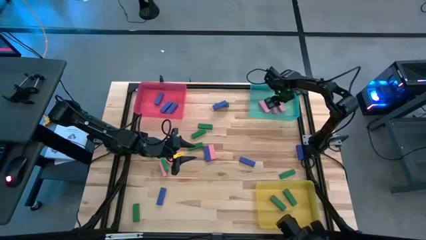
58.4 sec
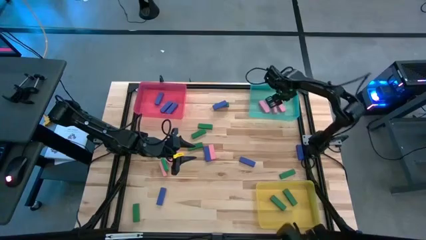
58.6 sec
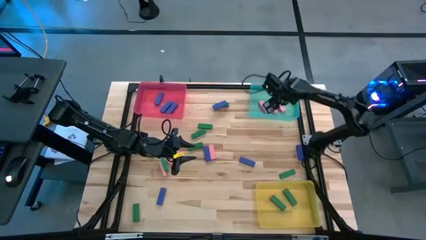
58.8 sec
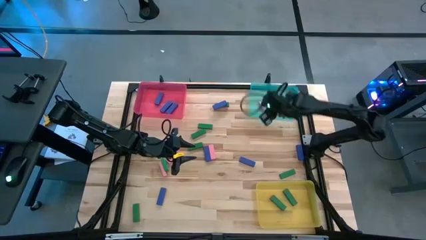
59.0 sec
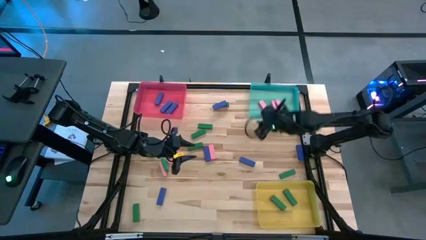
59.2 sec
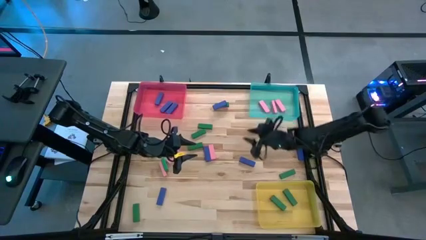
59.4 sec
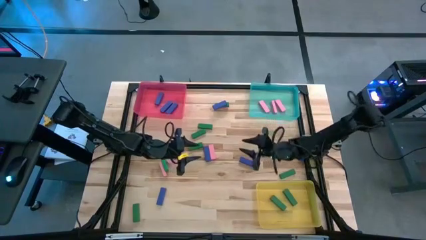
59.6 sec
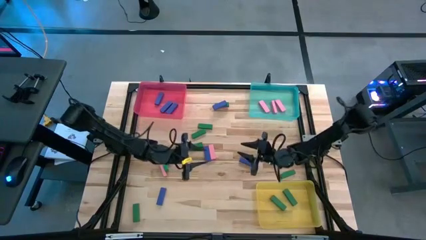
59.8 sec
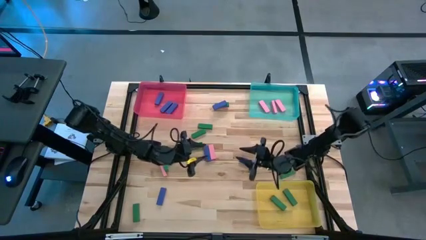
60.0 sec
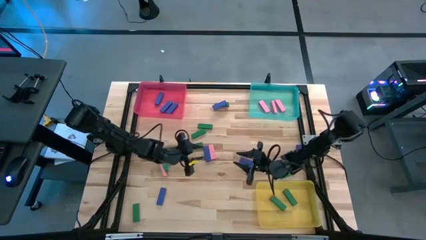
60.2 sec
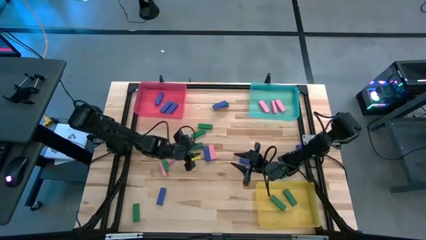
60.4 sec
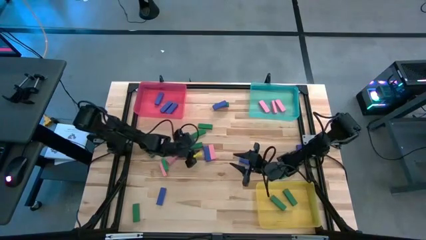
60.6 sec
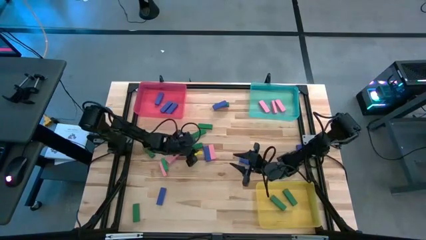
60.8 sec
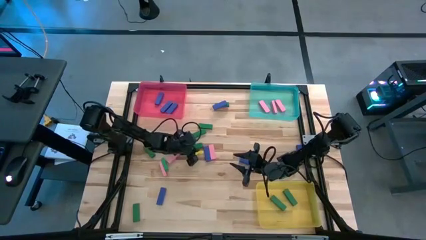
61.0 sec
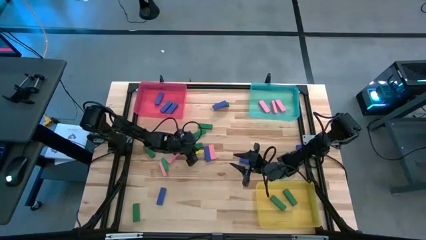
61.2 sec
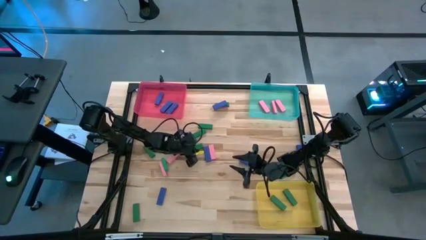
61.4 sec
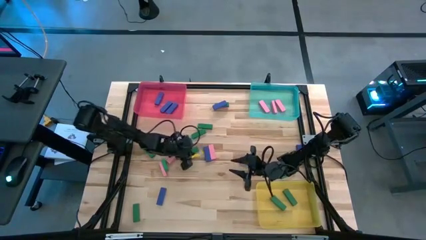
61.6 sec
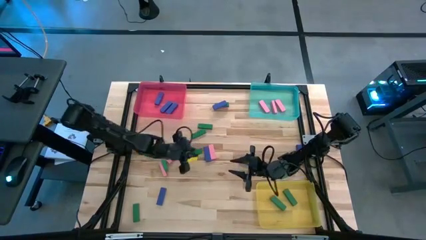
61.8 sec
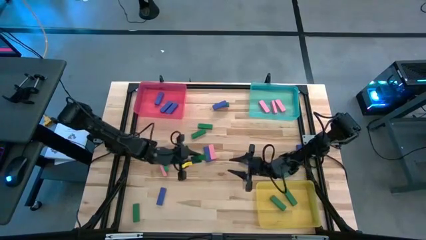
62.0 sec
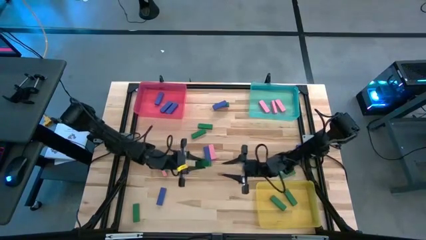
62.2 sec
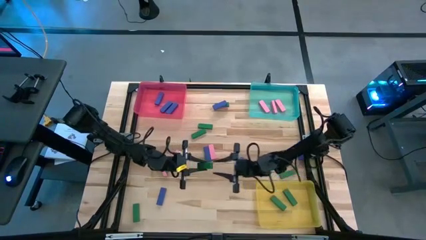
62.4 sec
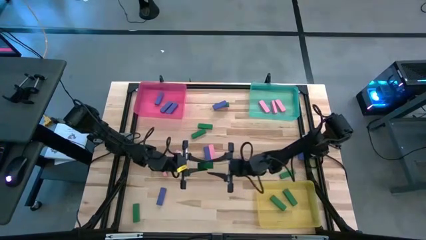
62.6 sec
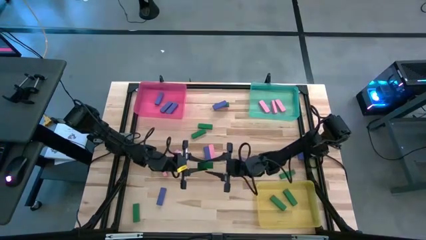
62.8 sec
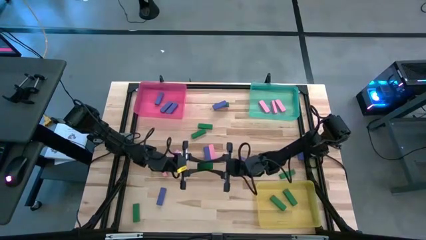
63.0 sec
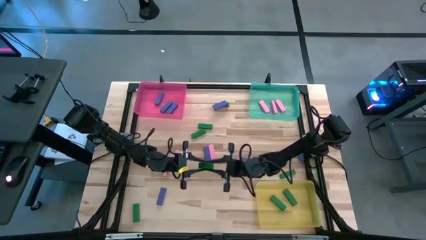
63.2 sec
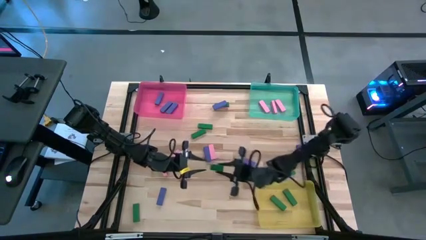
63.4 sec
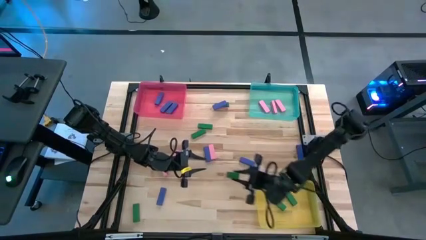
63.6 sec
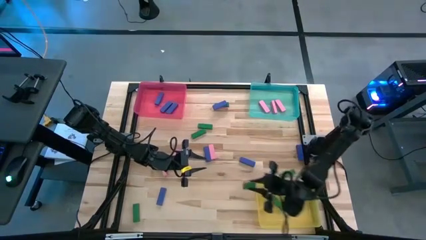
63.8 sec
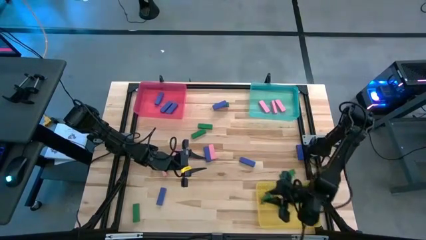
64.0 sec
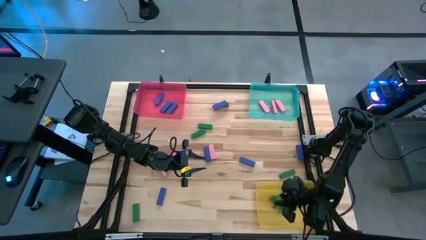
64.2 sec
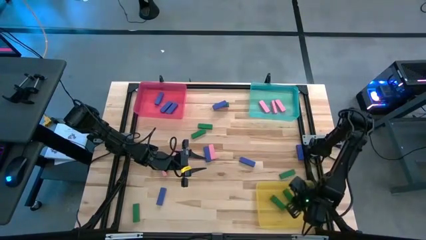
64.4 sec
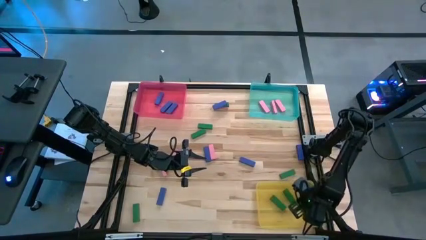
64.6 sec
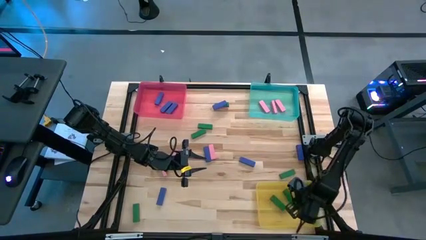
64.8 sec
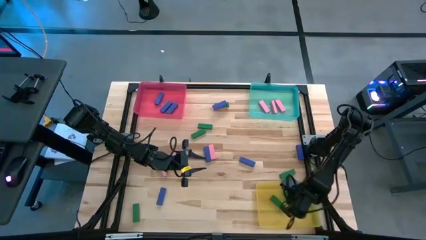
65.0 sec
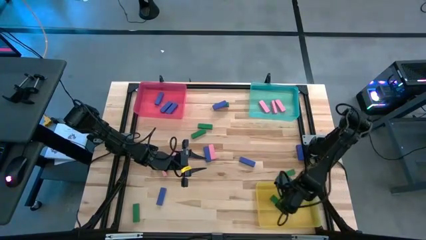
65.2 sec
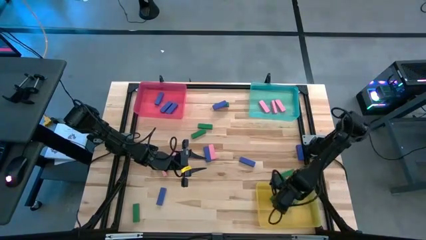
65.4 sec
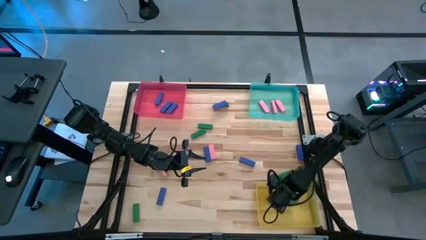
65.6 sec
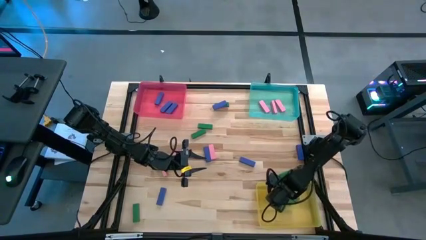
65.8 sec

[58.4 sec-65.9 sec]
Task: Sort blocks
Put the green block into the yellow bin

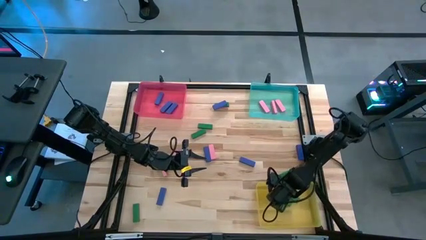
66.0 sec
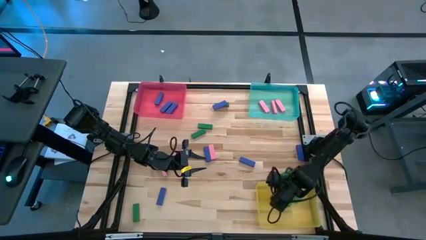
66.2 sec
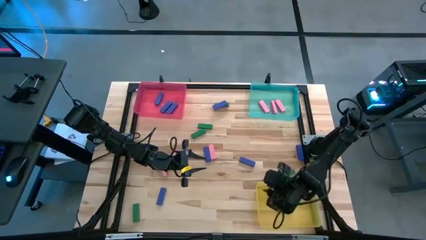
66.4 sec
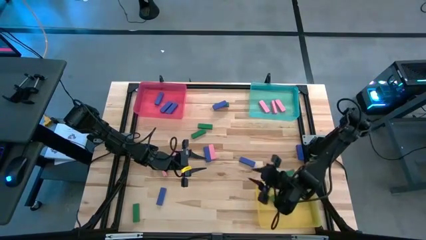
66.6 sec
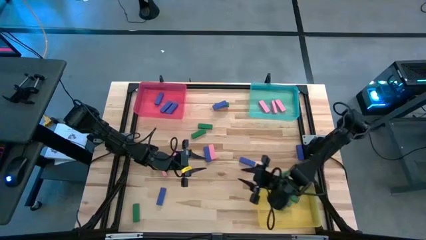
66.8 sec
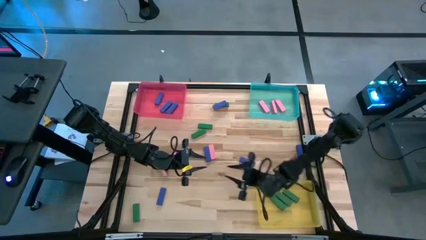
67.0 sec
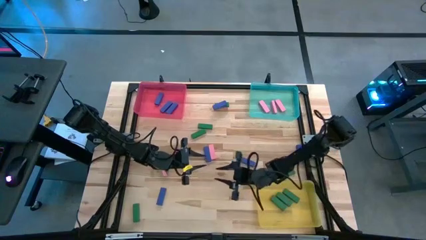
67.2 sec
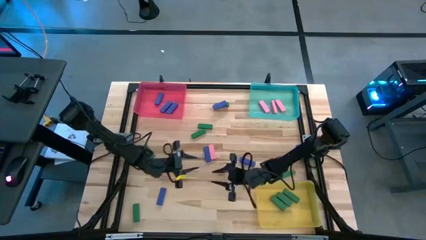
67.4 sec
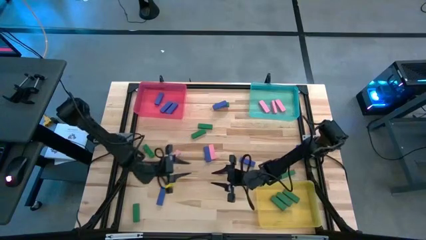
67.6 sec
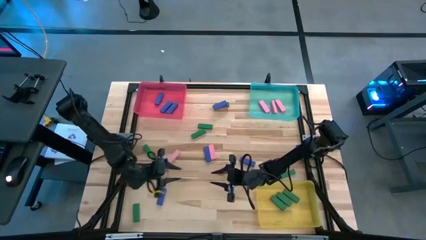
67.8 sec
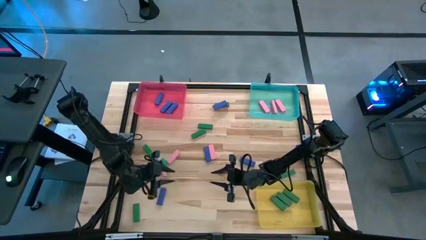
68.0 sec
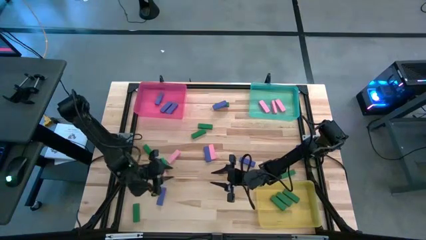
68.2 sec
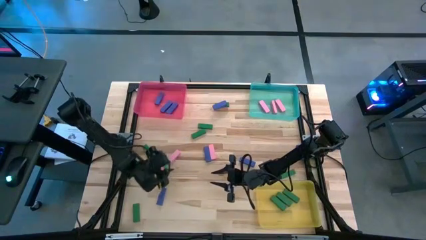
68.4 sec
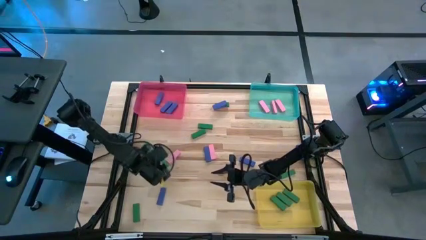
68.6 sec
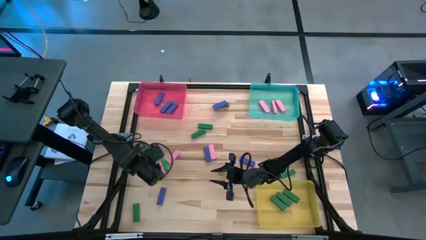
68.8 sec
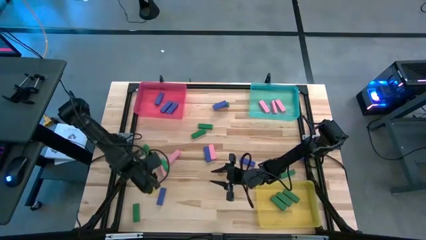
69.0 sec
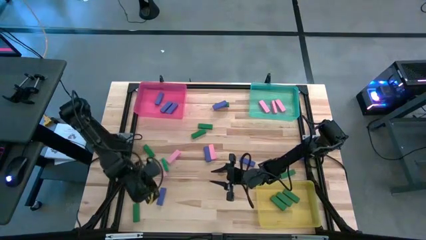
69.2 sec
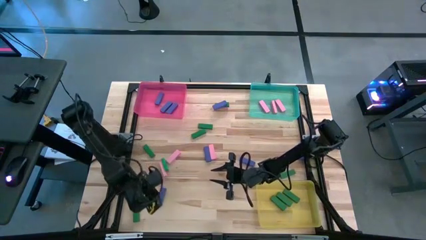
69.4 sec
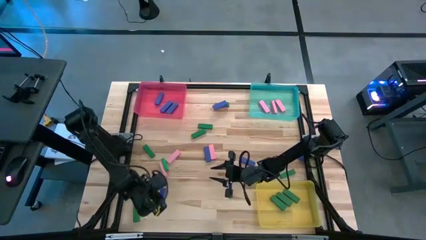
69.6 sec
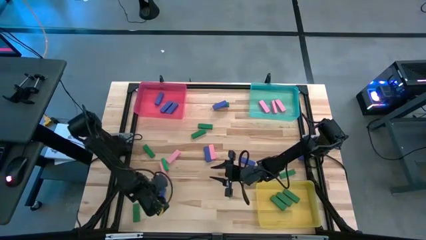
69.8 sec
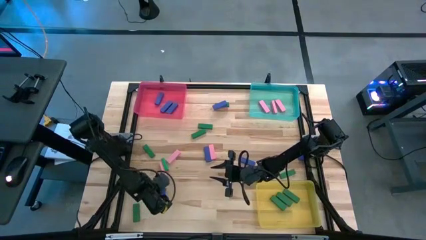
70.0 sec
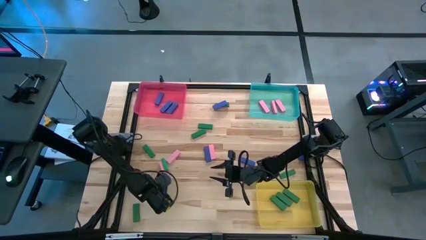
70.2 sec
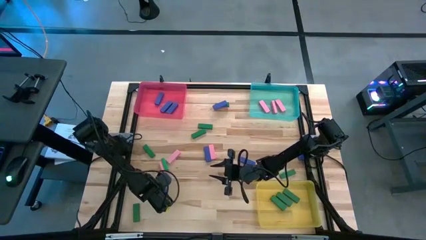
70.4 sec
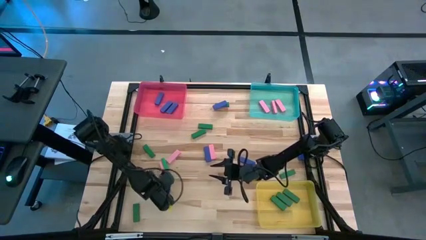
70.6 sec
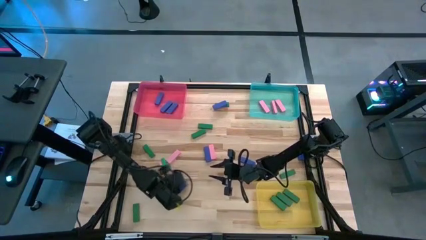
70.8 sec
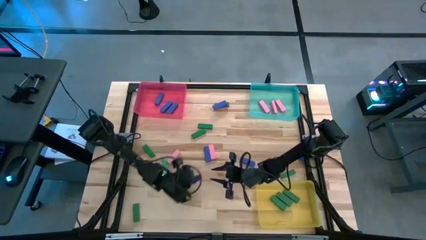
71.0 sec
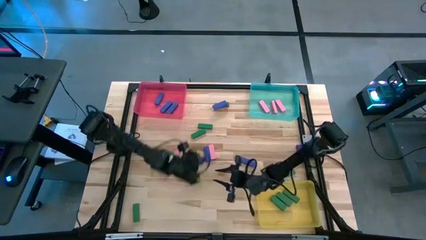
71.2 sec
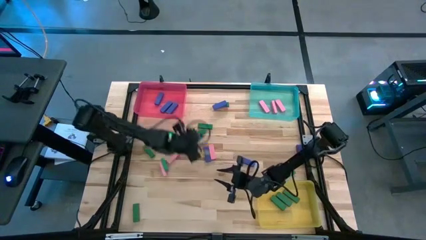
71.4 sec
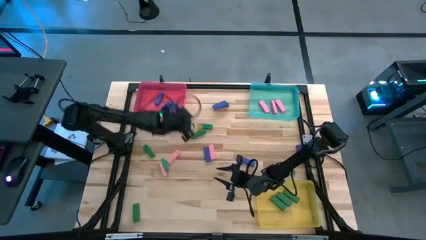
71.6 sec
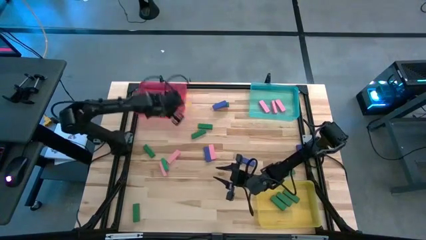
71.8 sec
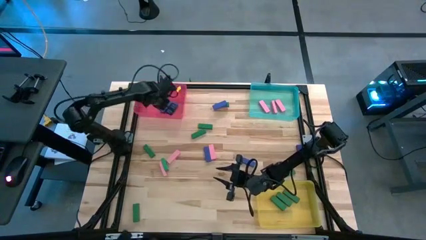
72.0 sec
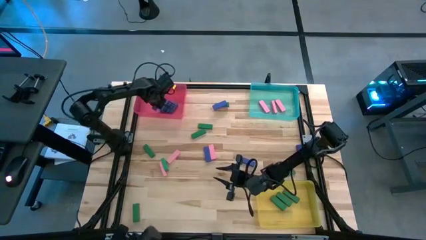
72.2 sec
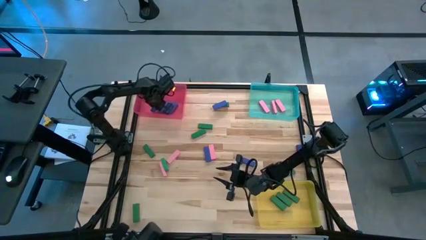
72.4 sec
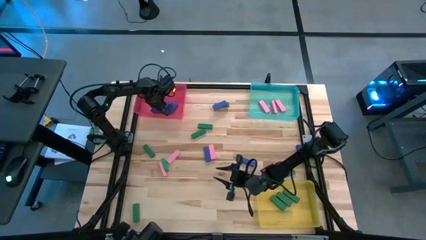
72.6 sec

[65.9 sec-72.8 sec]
Put the blue block into the red bin

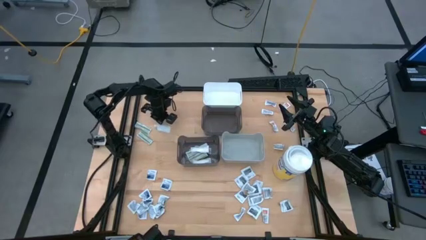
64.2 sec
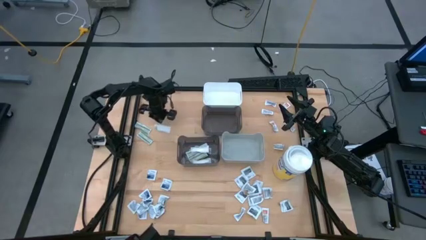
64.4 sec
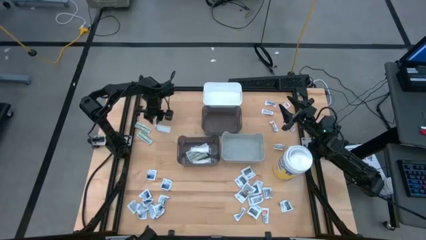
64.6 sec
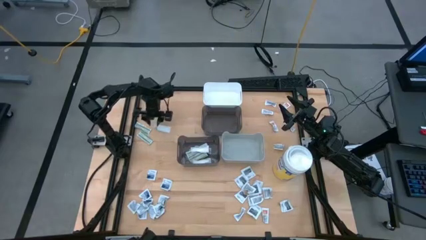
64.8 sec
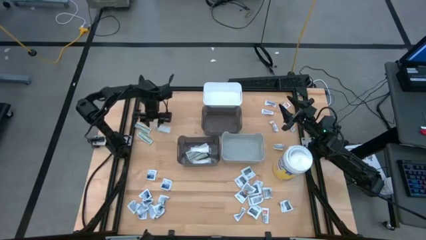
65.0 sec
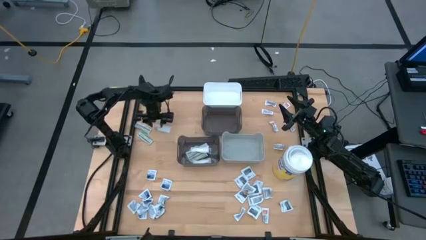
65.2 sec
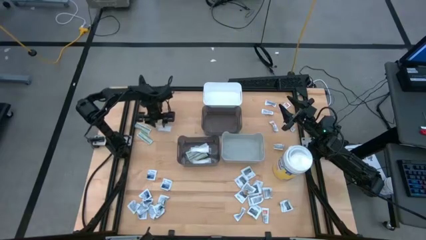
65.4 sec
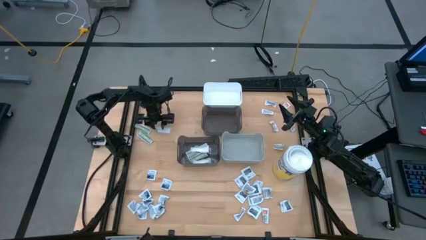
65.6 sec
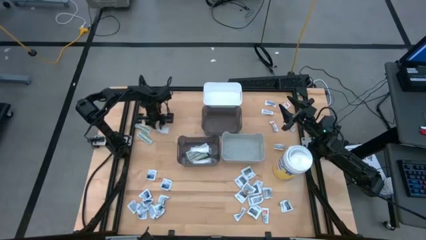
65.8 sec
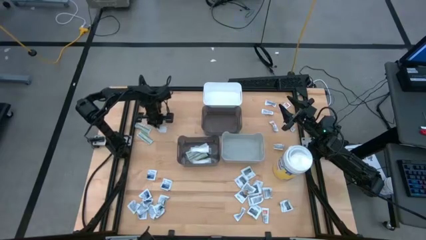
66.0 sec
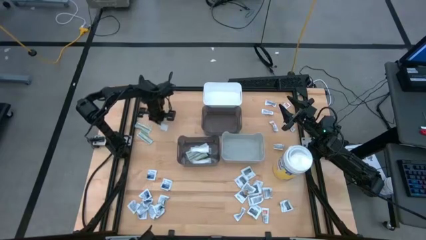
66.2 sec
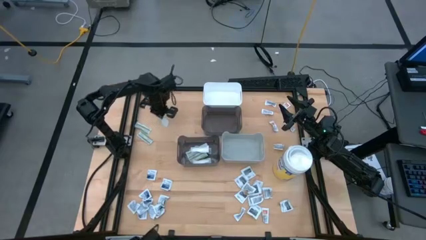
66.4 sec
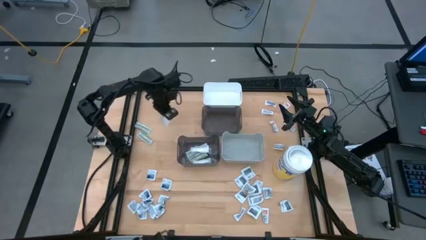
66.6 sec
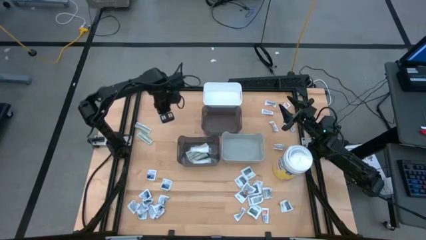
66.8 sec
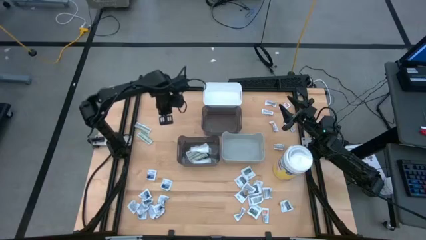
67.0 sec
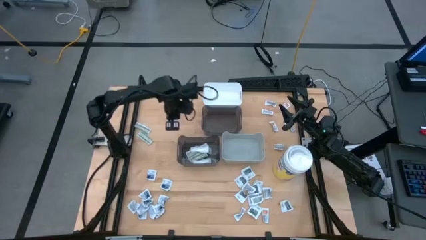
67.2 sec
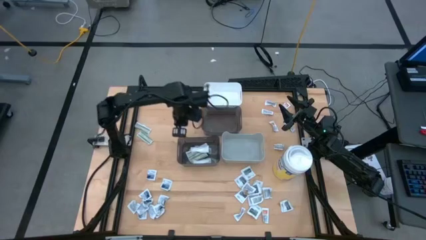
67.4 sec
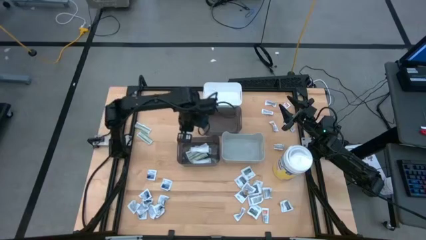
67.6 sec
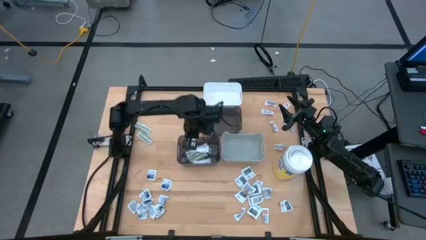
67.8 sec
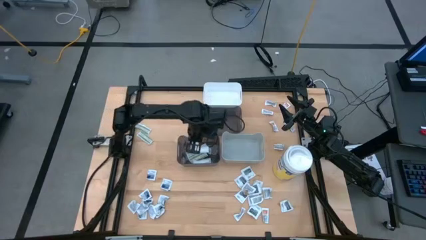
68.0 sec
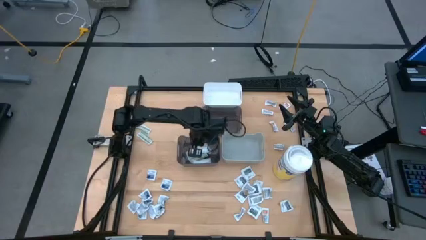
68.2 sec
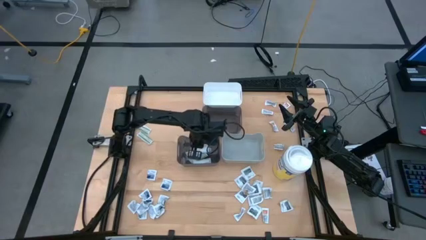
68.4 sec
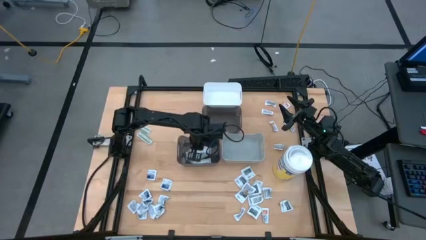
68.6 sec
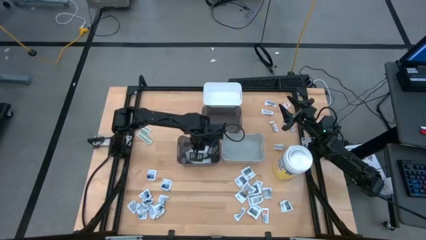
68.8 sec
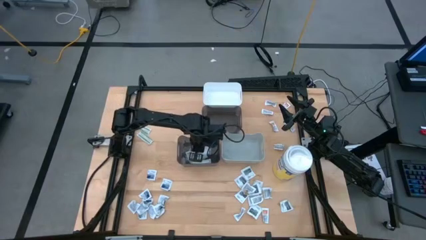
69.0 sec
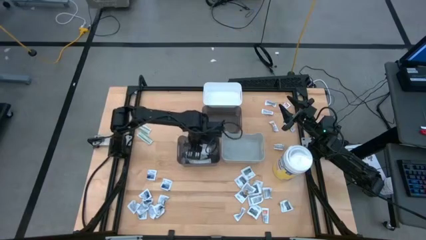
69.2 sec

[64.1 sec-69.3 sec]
Task: Pick & Place First Aid Supplies
Put the white bandage into the bottom black bin
